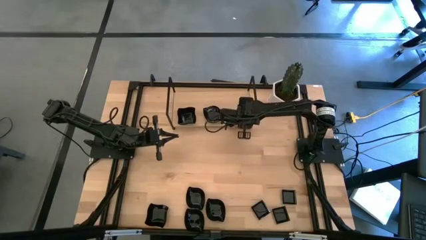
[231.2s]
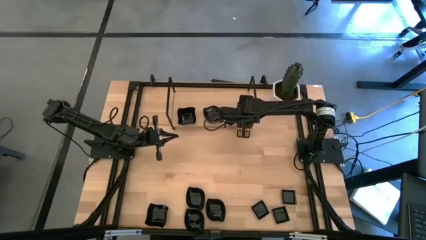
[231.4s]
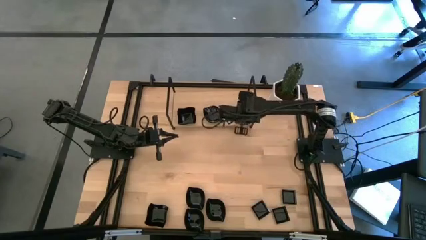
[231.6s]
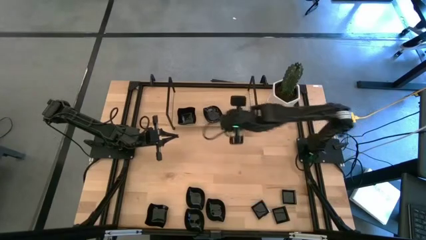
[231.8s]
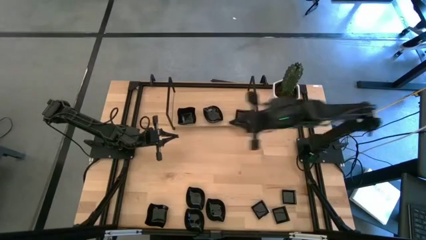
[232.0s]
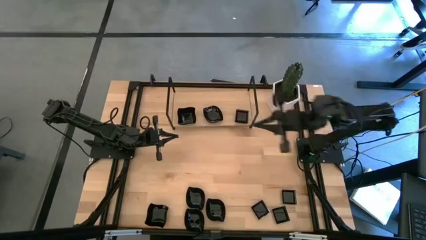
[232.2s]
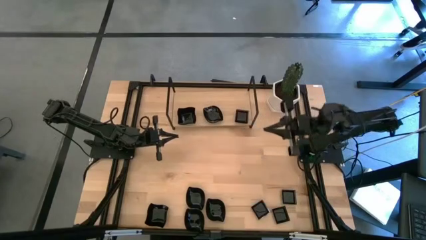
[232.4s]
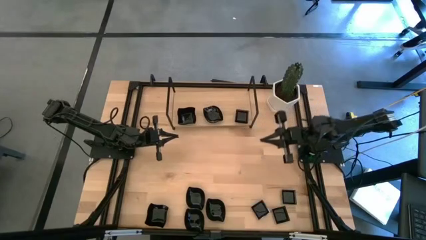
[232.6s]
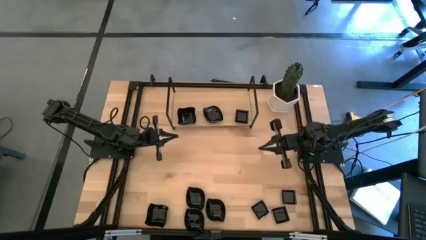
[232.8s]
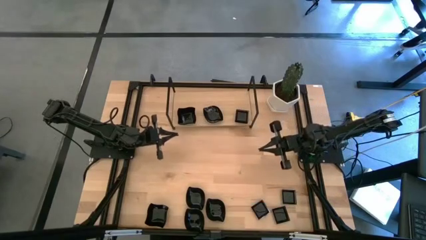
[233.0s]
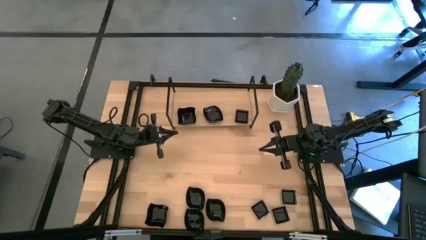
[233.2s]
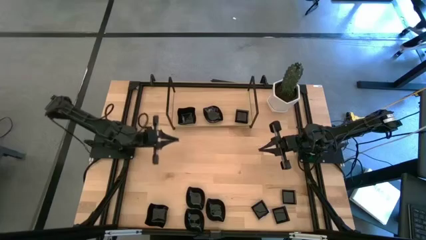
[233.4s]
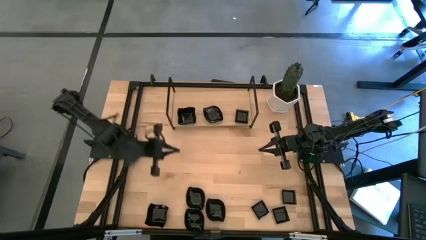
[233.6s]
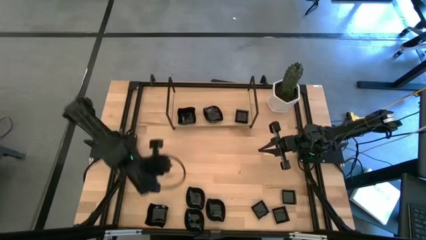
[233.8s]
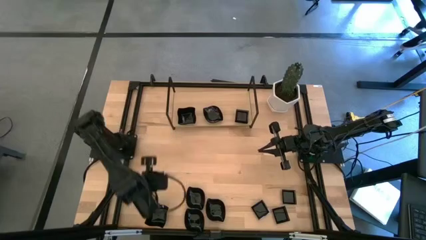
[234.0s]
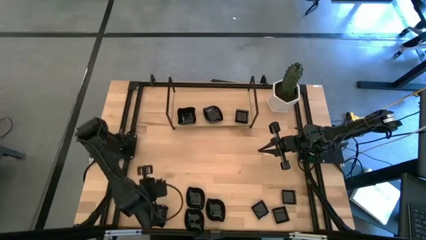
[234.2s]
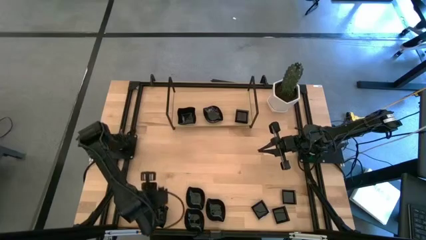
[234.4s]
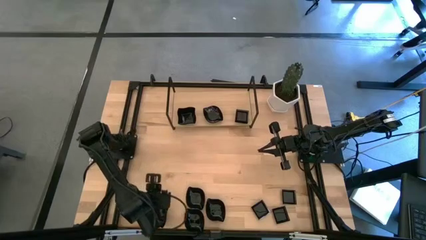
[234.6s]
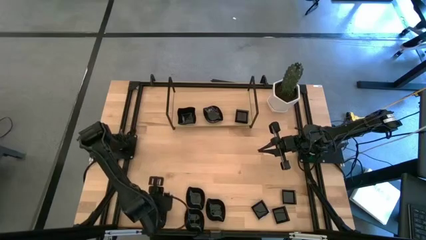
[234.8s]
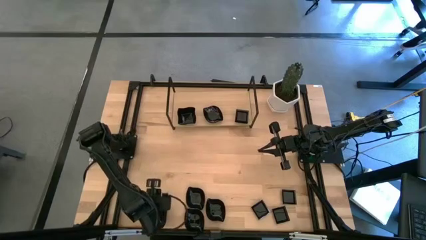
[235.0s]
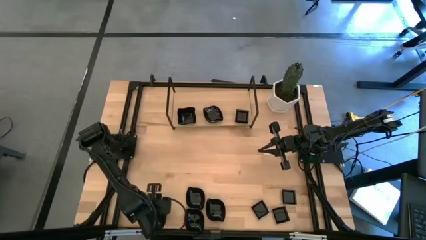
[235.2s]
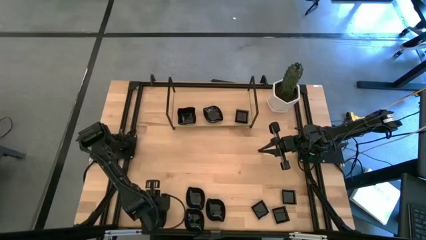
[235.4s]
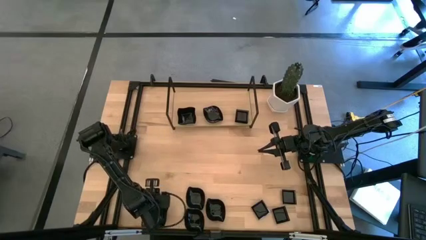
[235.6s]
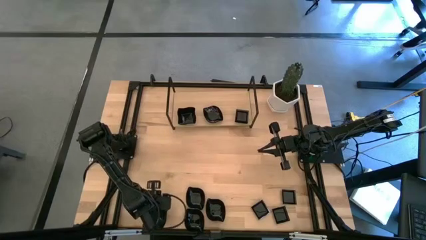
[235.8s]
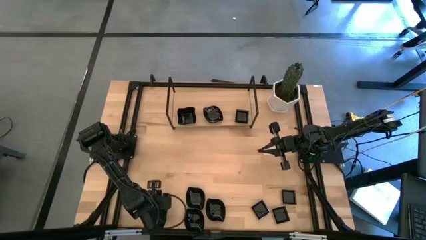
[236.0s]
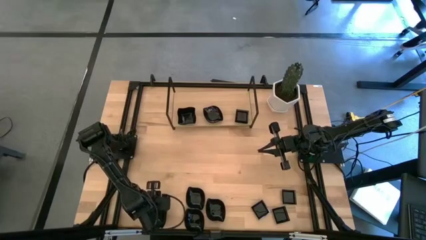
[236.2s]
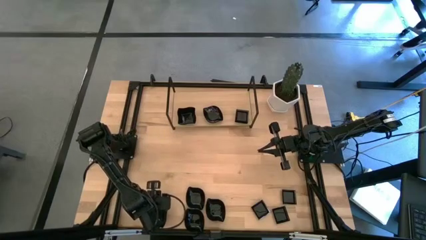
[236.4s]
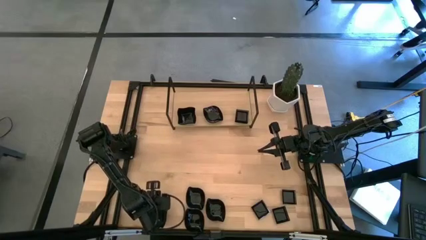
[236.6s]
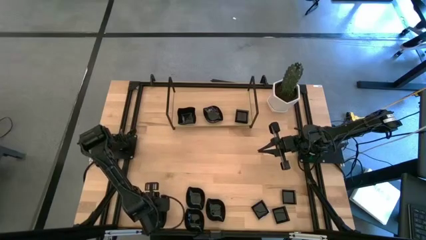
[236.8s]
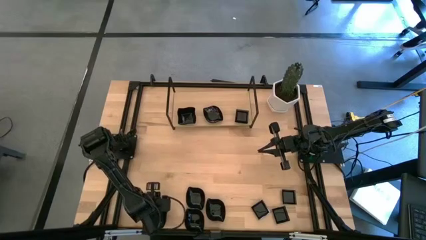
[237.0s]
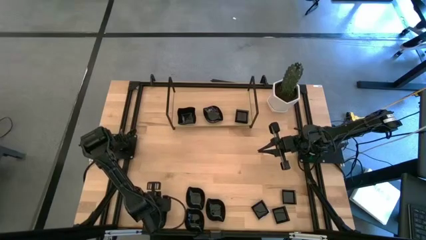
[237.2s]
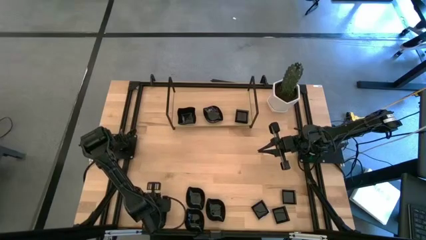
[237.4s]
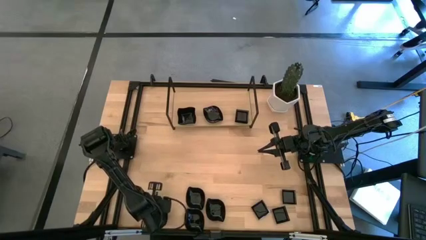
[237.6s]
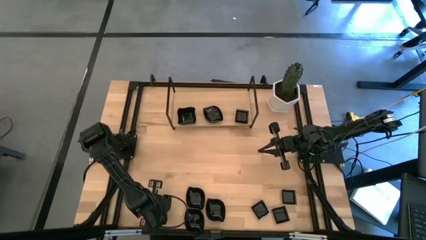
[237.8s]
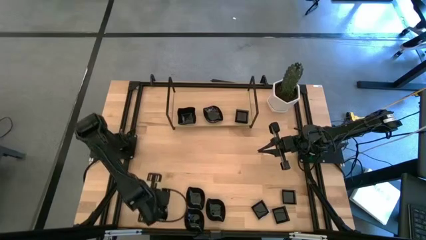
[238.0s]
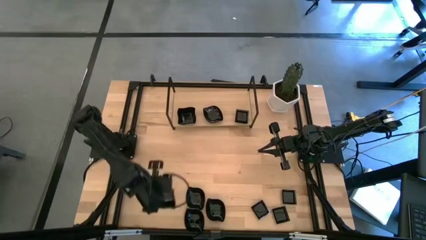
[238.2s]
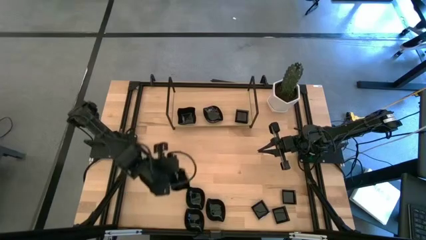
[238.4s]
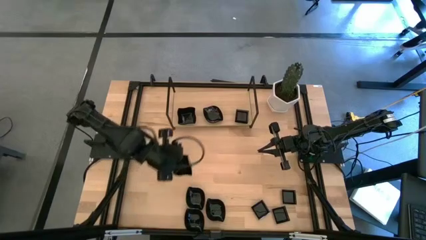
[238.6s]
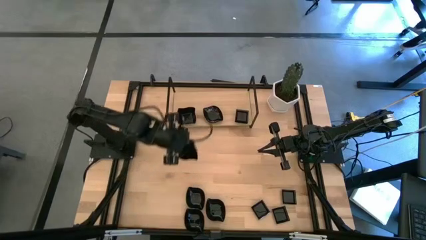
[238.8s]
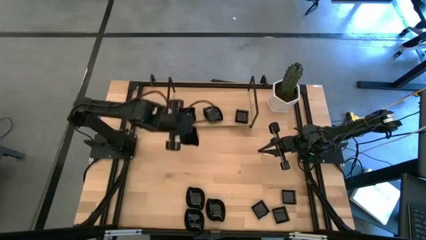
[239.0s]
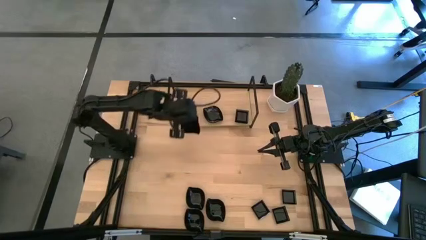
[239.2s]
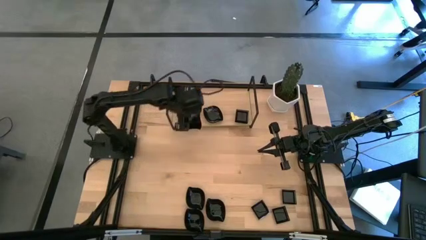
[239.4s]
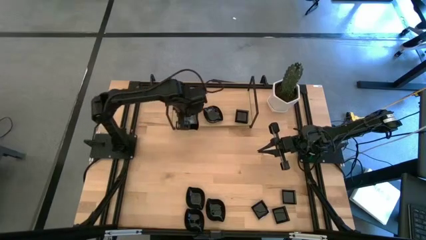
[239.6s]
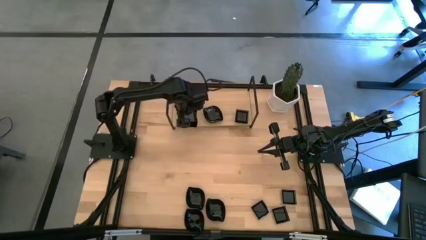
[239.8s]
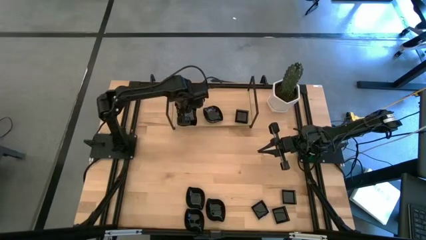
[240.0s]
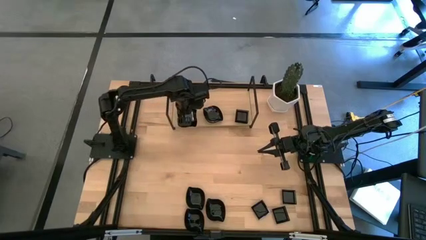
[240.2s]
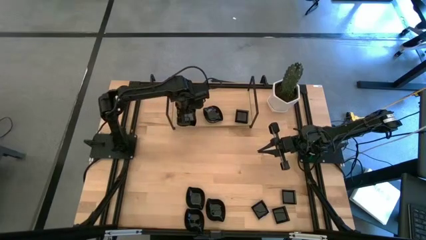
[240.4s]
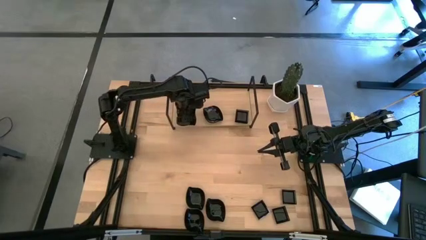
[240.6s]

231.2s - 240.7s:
Task: Pick & Place Mini shaped plates
Stack the black distorted square plate on top of the black distorted square plate on the shelf

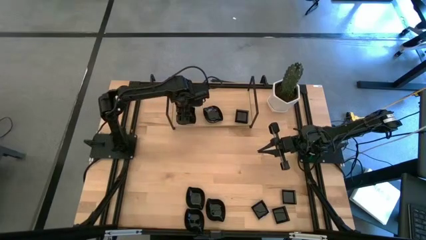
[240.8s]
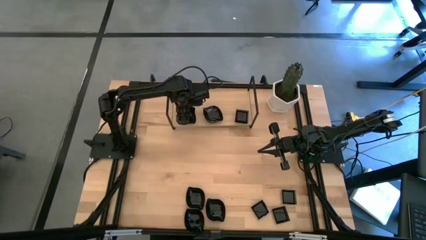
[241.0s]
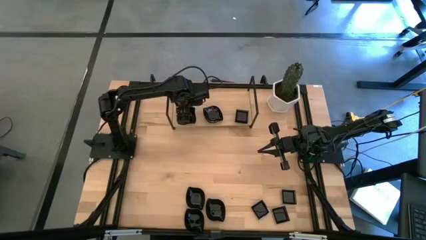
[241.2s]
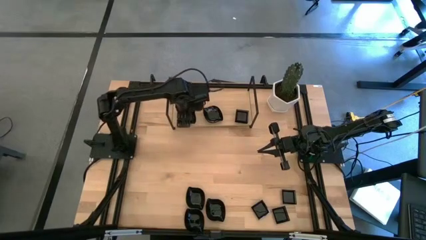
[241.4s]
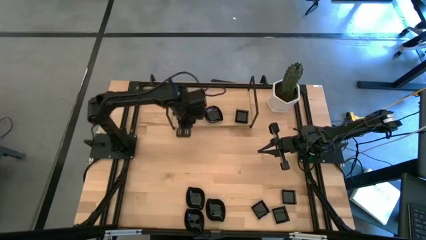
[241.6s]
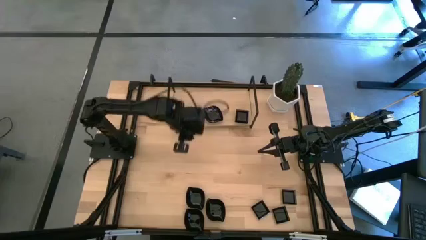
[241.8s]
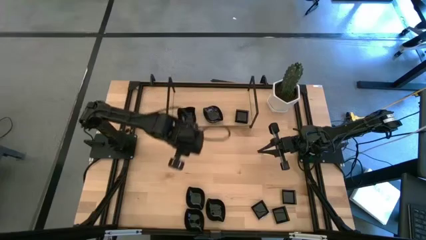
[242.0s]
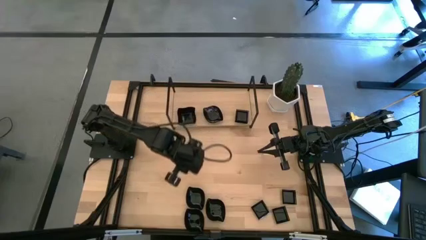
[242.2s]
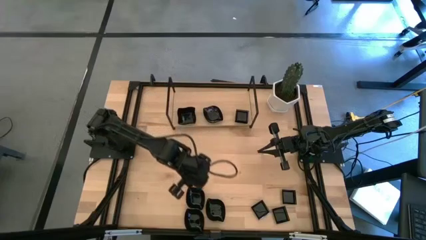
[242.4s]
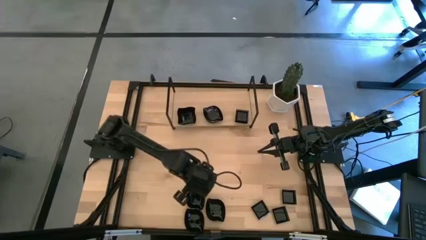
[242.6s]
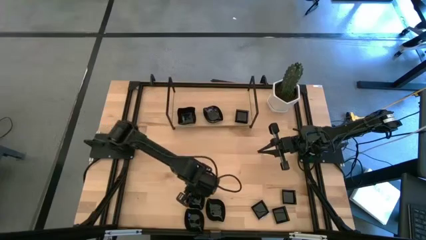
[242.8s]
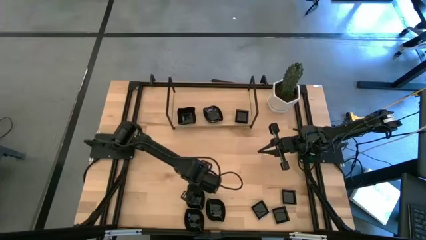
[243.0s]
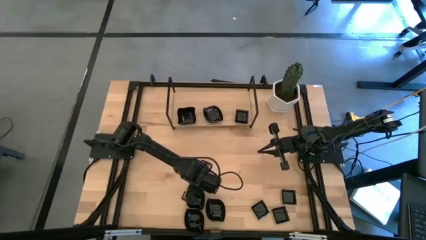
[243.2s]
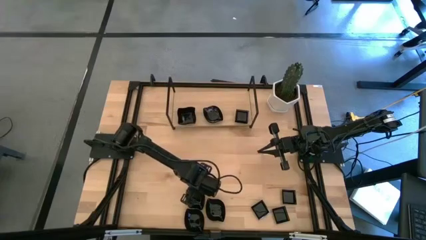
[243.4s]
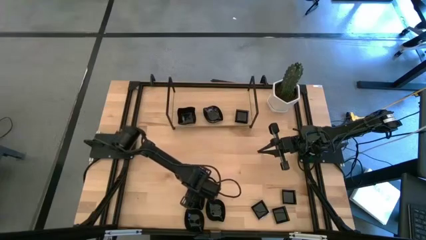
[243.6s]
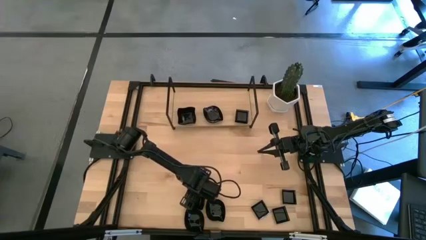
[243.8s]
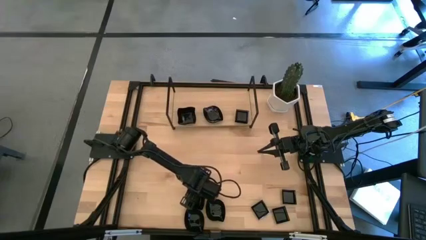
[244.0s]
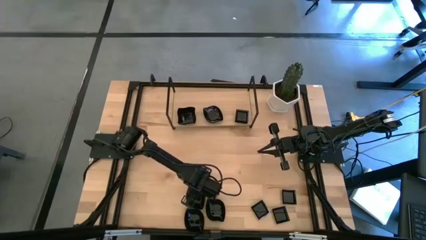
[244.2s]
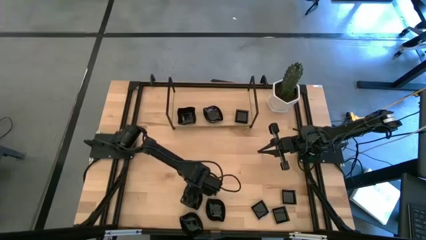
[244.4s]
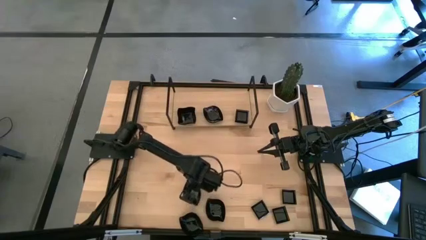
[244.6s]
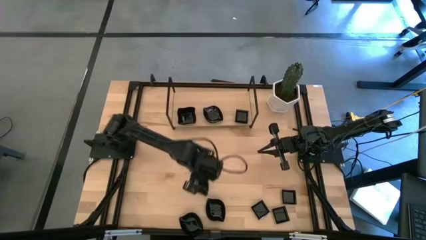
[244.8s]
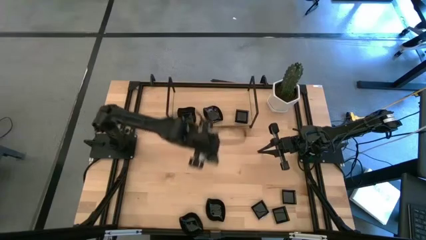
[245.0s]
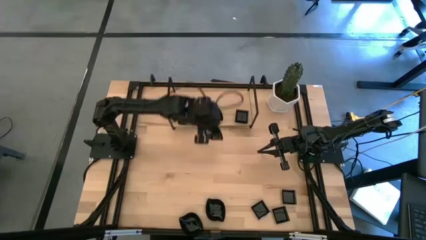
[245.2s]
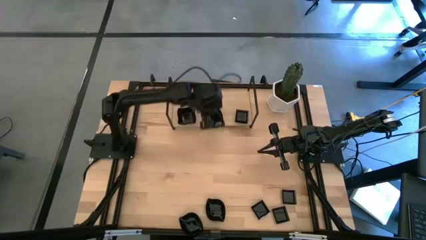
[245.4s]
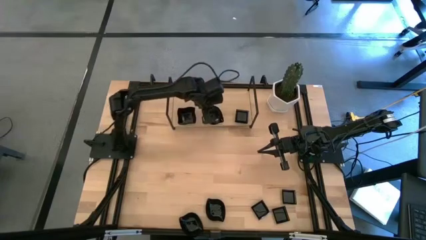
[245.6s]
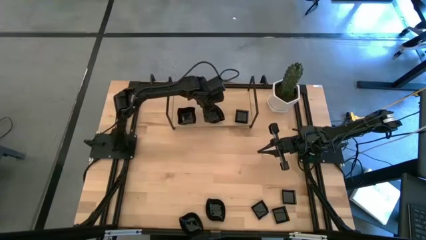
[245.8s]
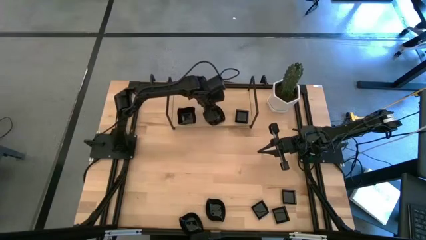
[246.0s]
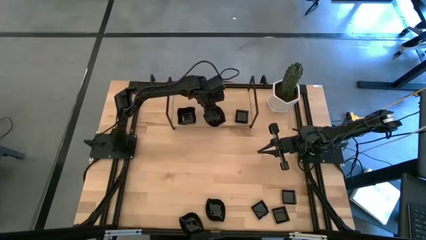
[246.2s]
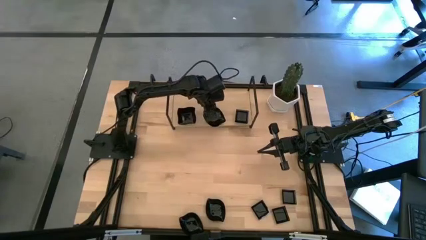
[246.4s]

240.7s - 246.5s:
Stack the black leaf-shaped plate on top of the black leaf-shaped plate on the shelf
